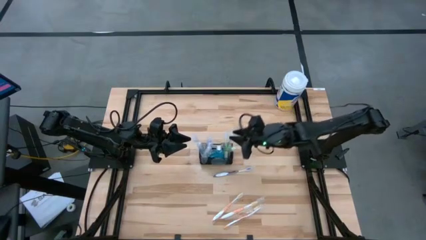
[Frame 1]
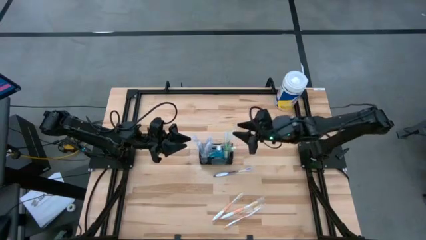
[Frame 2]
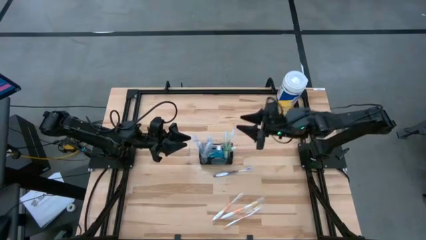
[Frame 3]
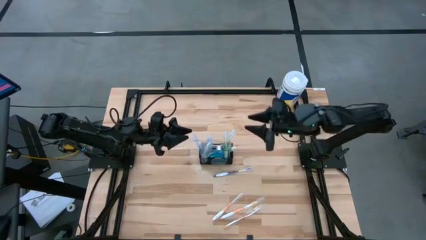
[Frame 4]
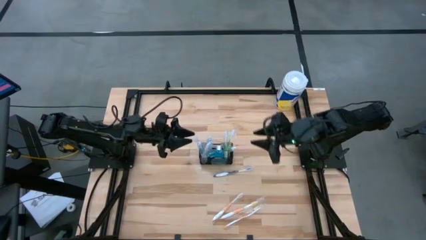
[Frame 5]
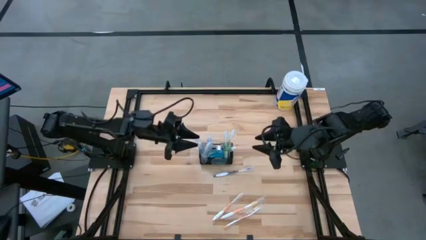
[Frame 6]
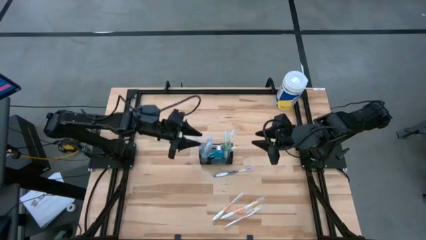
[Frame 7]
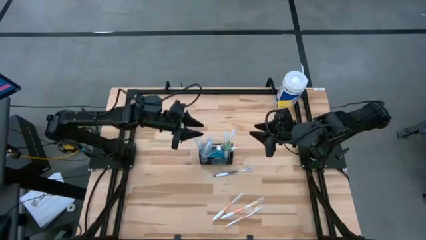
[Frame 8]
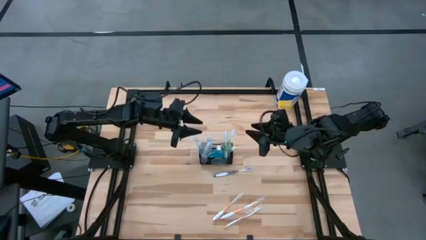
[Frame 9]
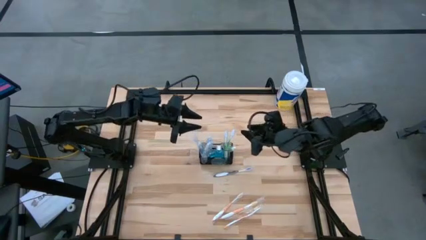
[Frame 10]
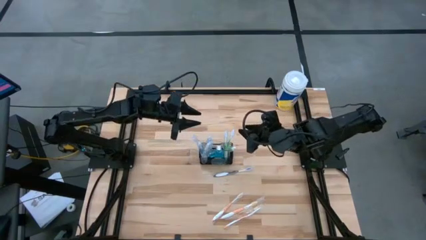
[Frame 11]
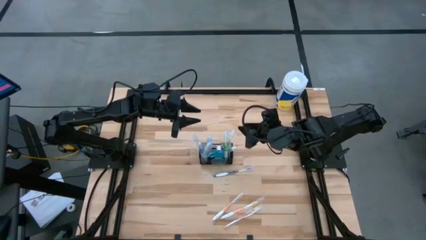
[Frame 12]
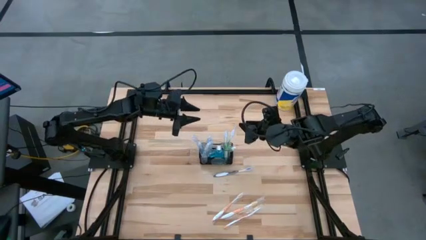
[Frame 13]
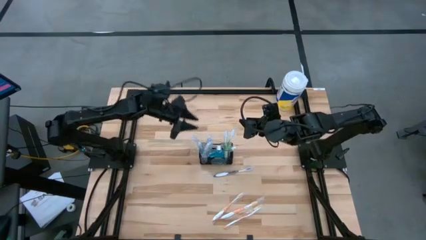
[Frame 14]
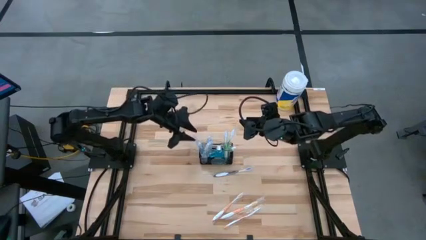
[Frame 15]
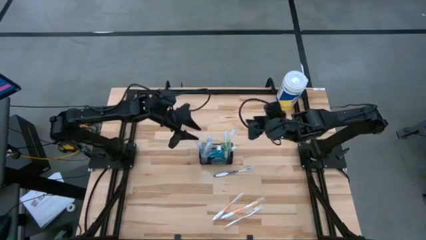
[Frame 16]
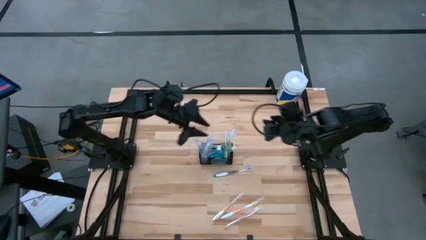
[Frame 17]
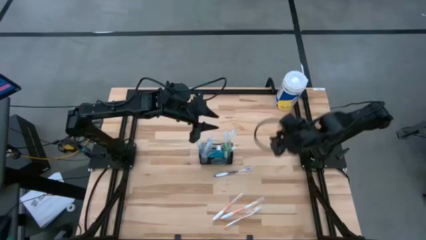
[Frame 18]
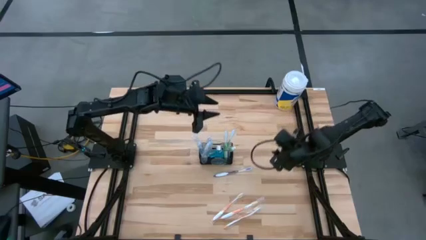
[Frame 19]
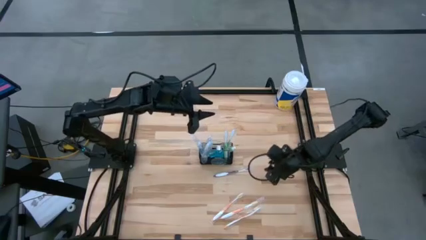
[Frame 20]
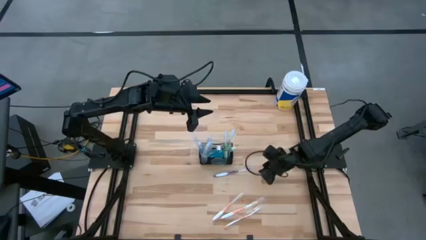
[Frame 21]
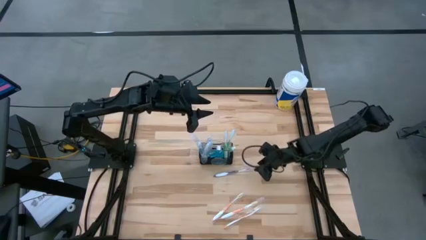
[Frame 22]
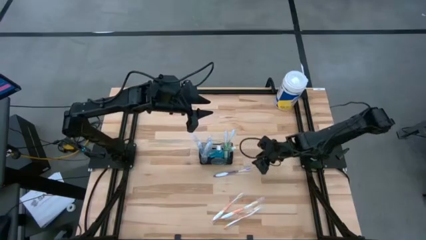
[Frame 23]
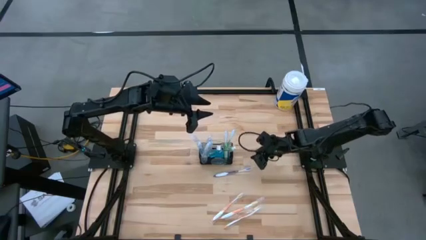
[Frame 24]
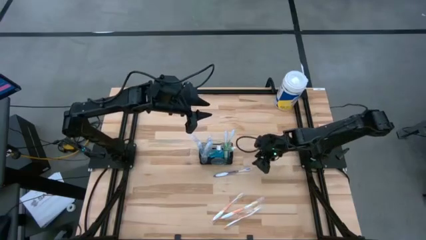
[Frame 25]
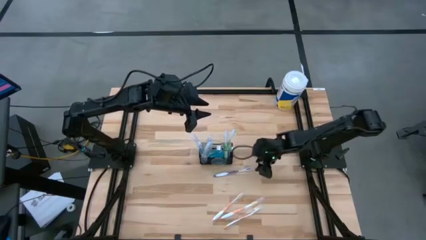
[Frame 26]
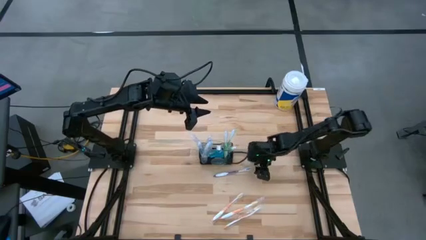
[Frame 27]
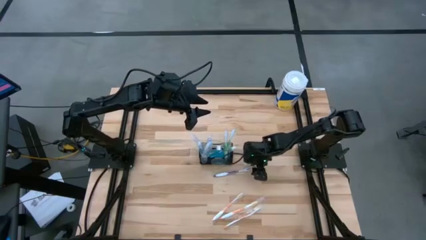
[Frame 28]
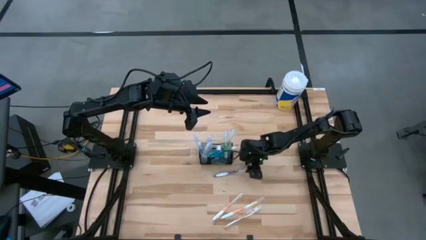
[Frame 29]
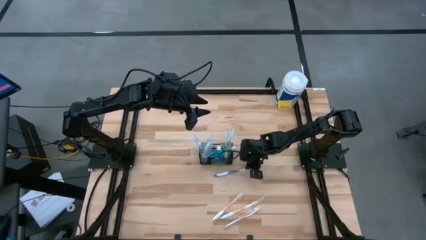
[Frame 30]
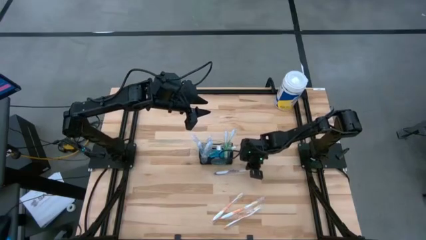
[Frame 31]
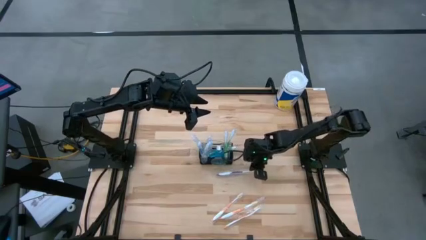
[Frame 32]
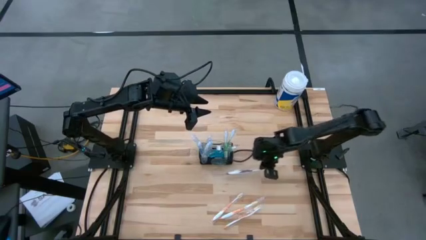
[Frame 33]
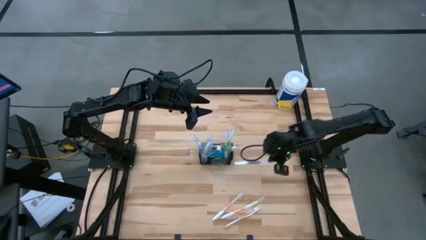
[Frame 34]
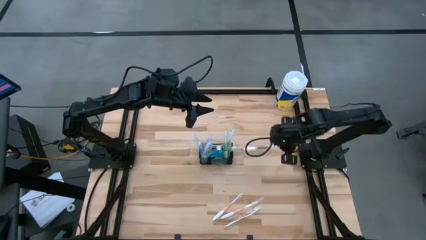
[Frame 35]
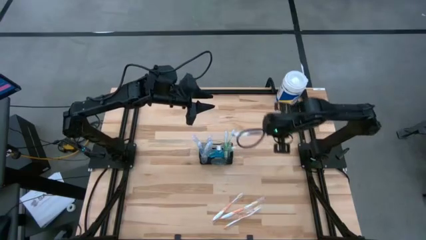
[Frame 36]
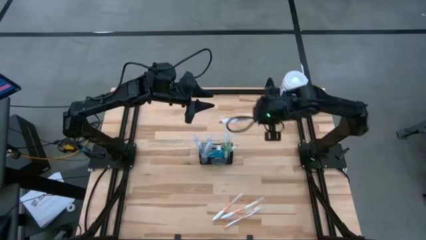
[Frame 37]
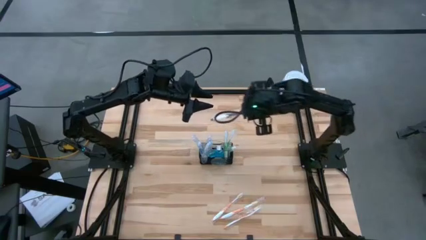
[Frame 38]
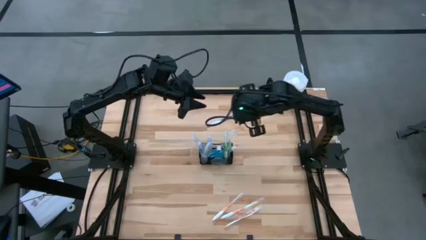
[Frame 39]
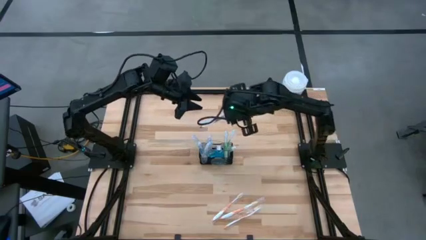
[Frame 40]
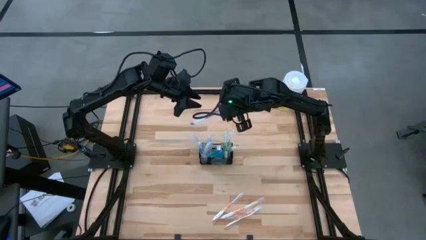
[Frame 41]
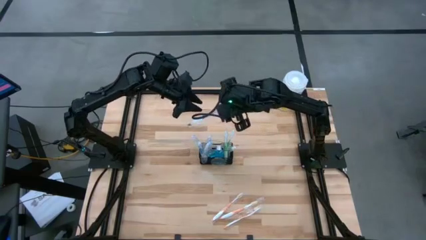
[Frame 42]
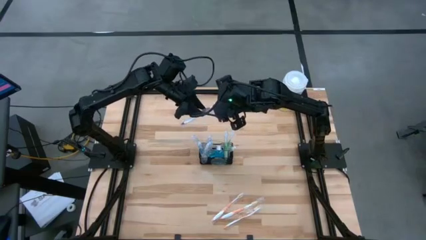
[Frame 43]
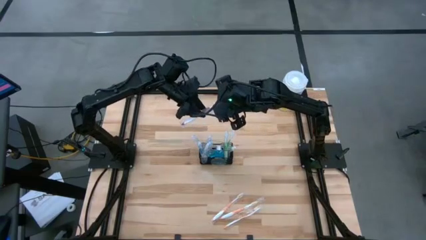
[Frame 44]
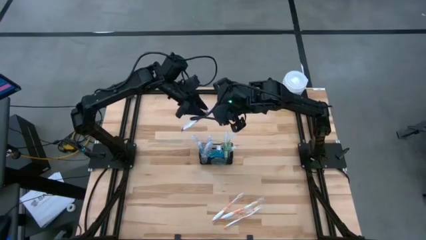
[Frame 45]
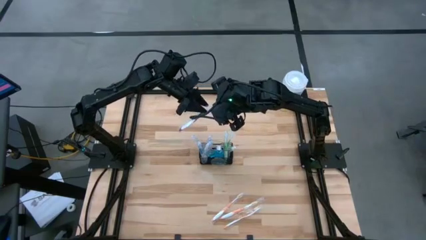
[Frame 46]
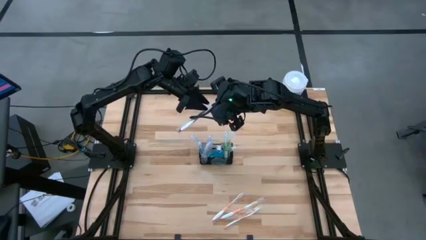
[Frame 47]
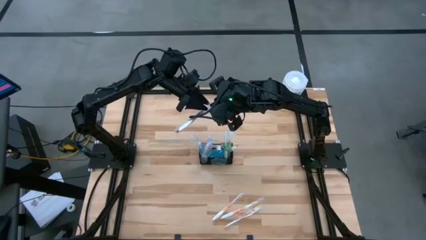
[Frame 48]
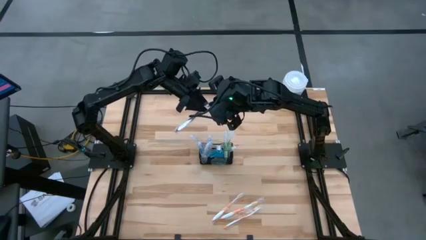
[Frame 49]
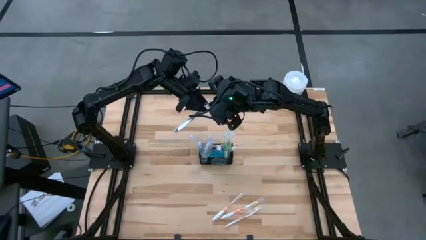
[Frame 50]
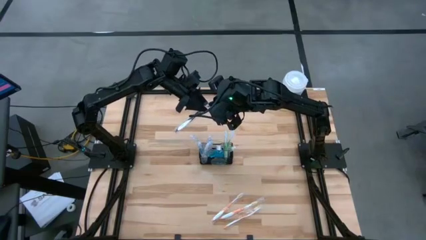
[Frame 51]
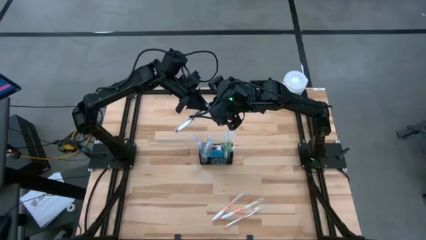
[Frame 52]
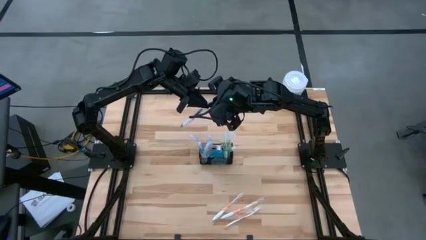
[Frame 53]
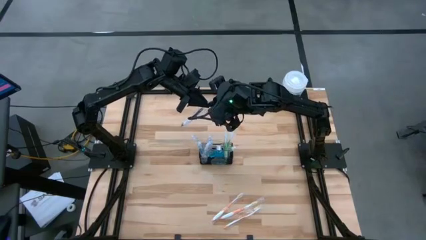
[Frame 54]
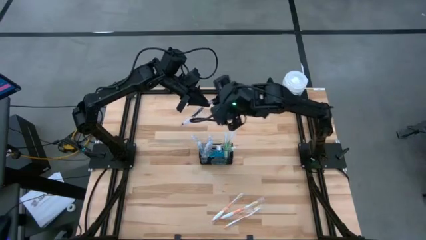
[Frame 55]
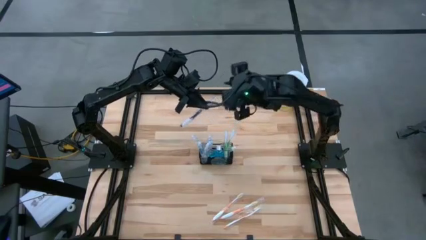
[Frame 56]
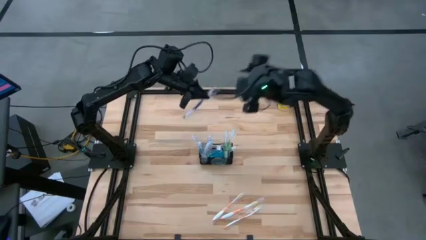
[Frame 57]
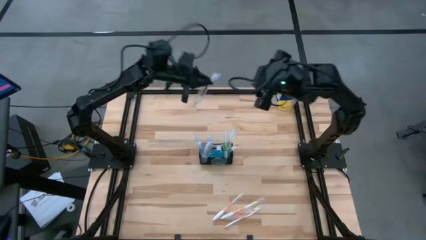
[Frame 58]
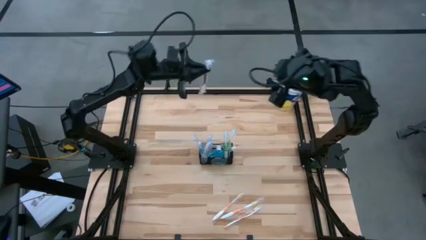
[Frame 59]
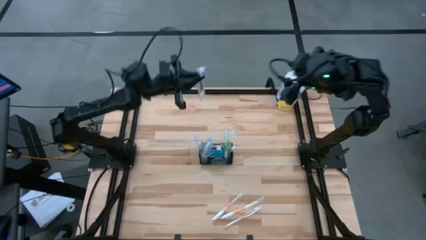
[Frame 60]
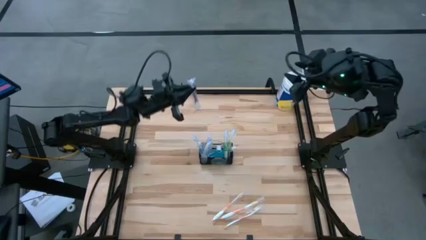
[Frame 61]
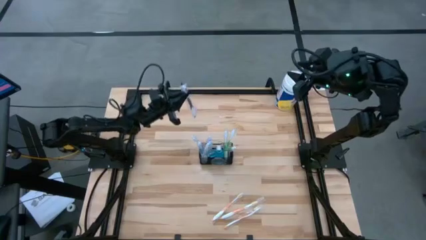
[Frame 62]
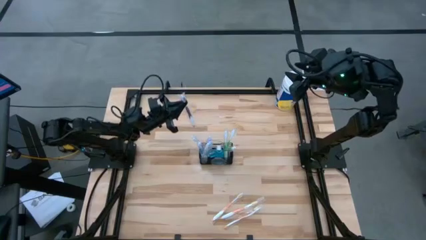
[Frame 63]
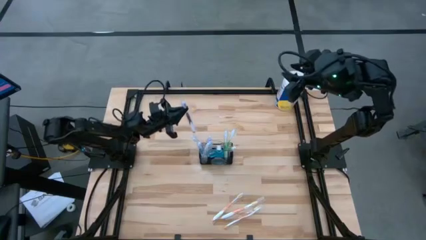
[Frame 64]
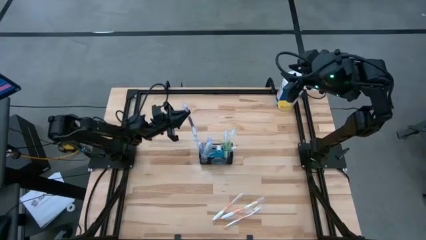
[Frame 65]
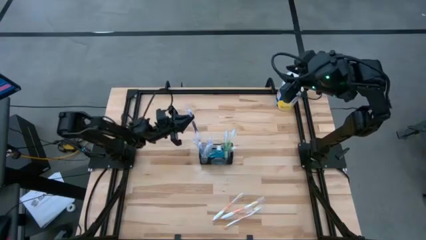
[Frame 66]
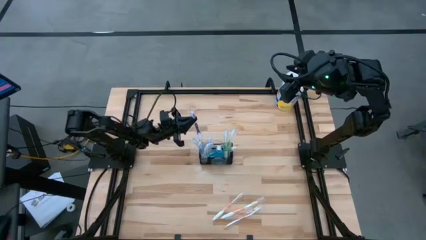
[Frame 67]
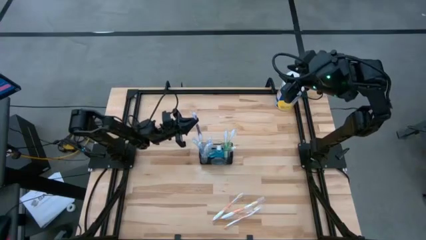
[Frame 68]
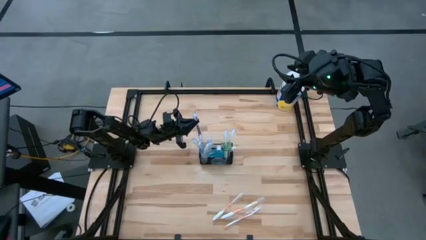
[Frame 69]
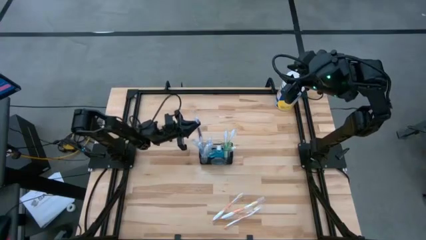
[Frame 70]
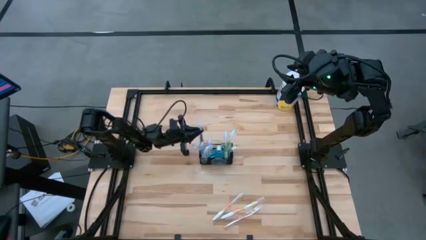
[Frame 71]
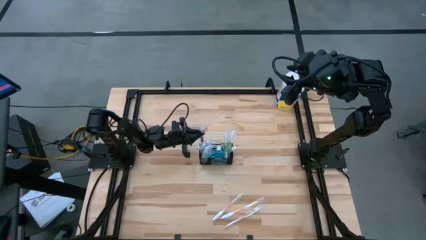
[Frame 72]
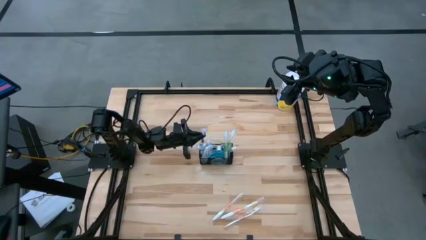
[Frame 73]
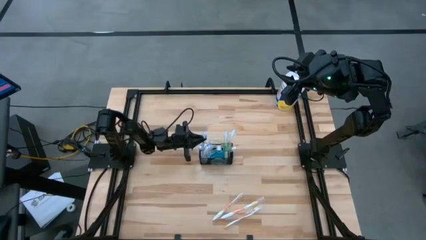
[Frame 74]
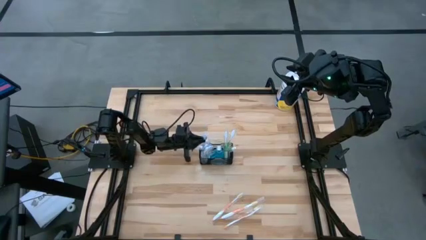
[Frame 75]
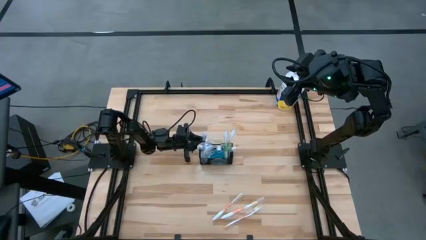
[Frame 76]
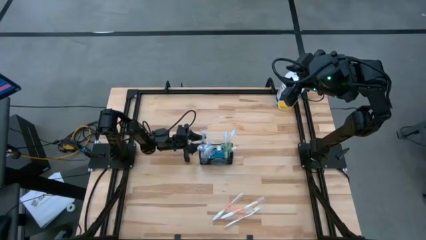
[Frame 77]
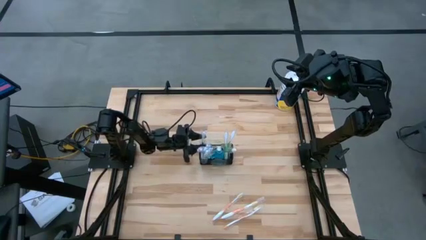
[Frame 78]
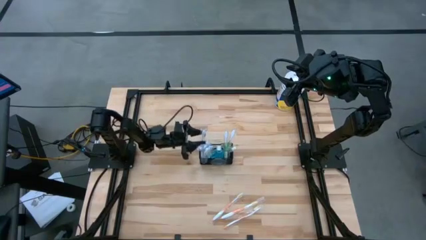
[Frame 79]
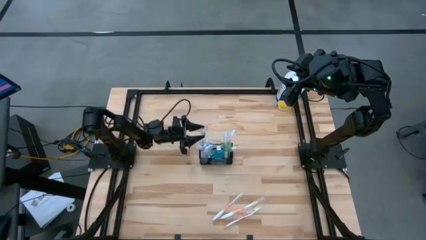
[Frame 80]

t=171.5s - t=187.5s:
Task: Pick & Place toothbrushing station
Put the purple toothbrush into the black wire organizer

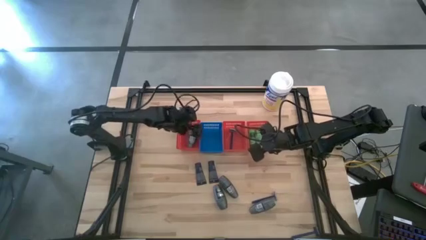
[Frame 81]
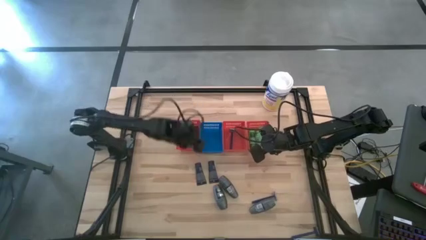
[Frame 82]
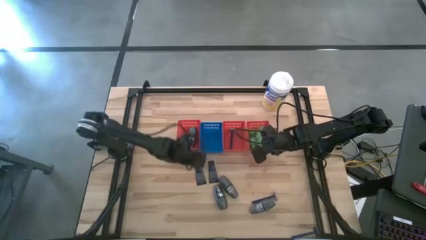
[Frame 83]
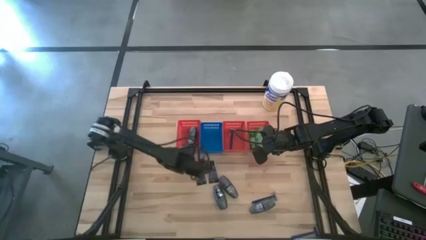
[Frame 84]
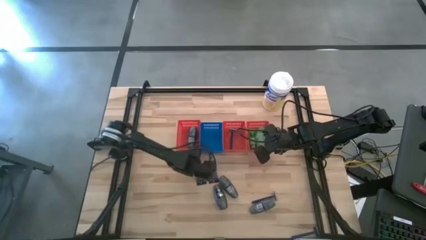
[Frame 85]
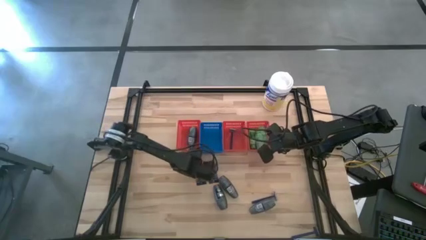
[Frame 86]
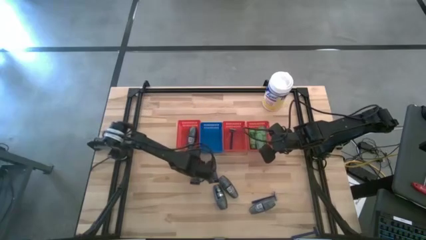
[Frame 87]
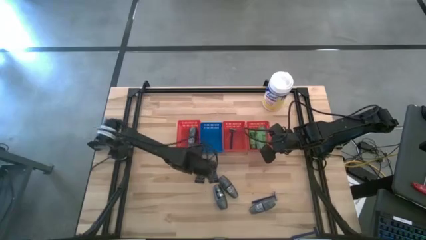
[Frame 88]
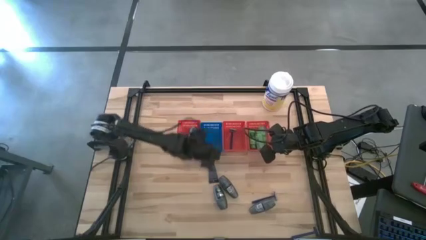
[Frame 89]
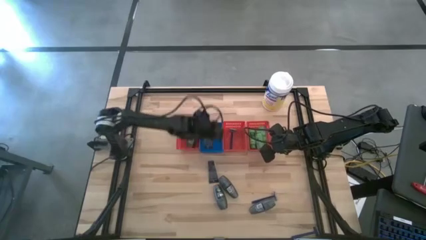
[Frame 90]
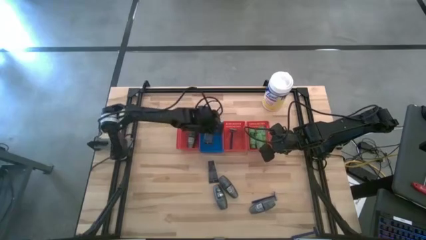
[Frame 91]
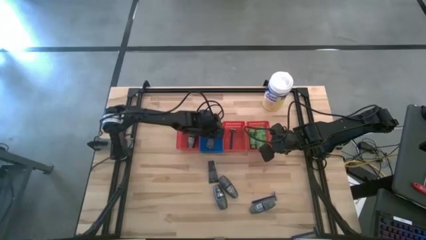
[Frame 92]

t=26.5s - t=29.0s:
Task: Pick & Place Travel size toiletries
Put the blue shaving cream into the blue basket
